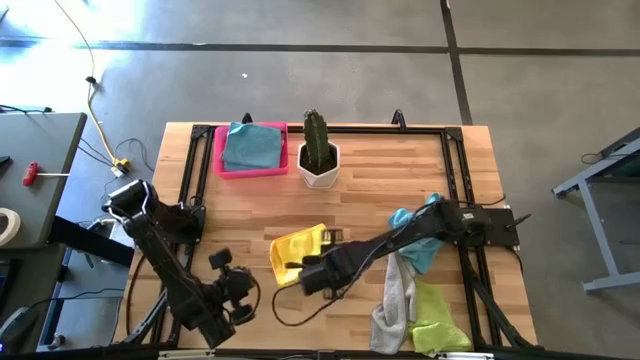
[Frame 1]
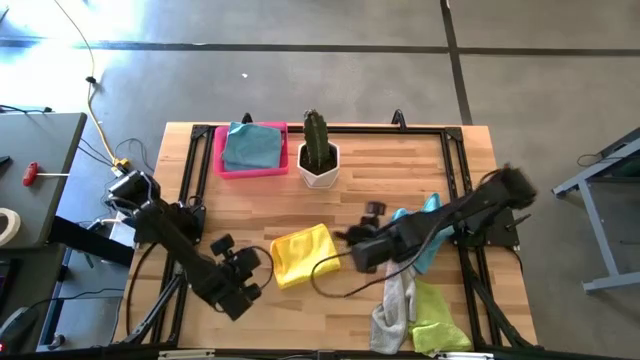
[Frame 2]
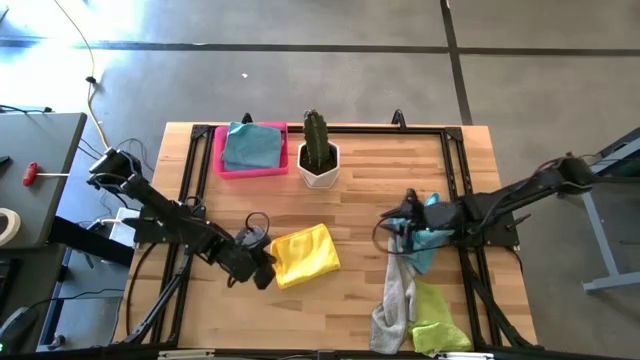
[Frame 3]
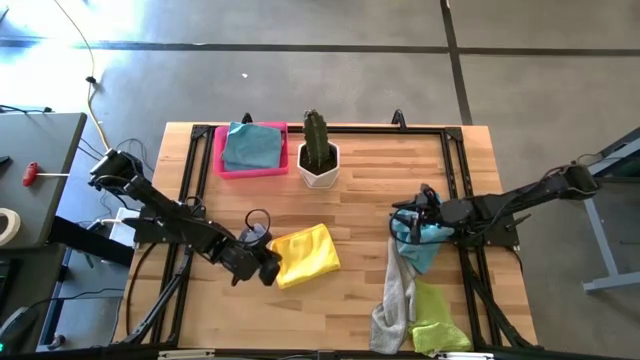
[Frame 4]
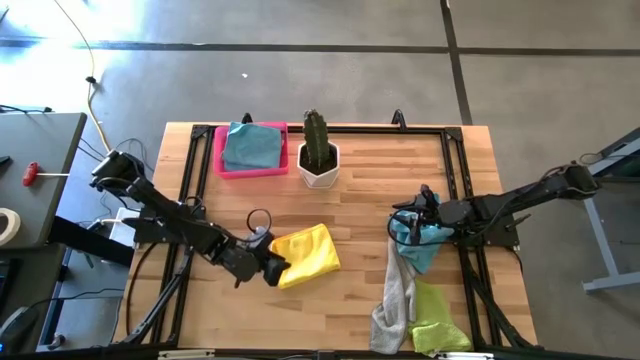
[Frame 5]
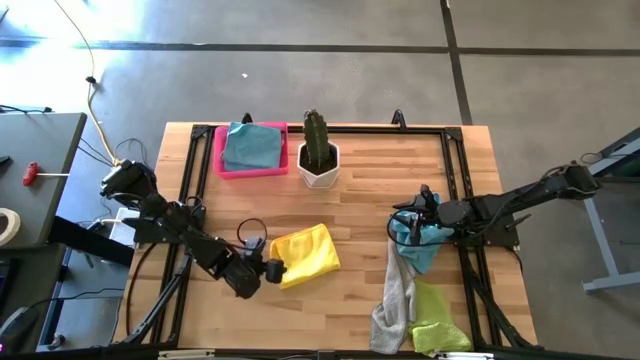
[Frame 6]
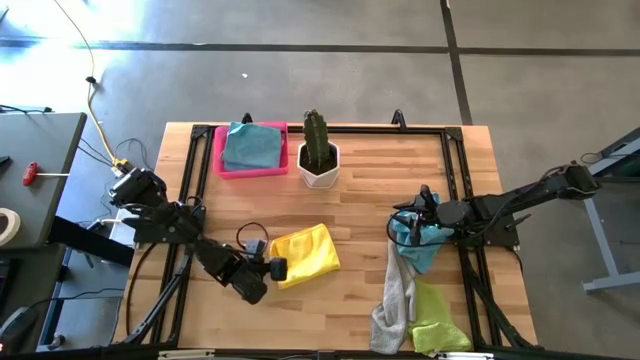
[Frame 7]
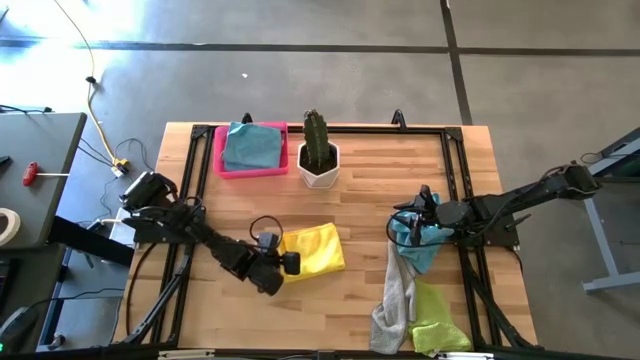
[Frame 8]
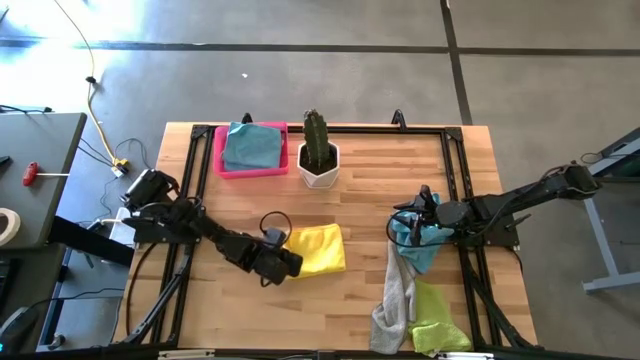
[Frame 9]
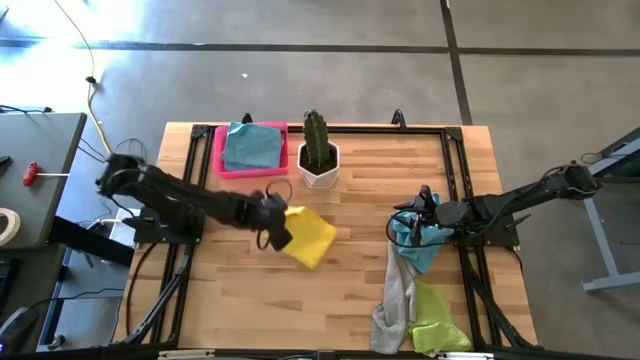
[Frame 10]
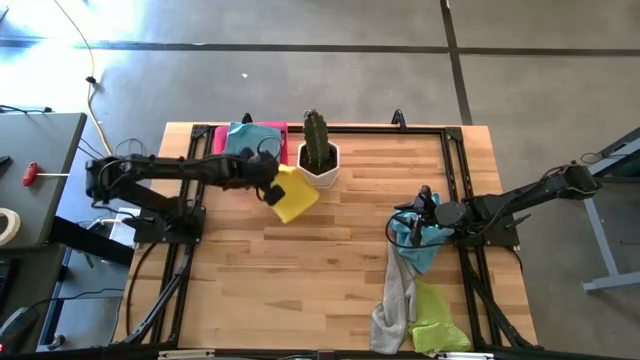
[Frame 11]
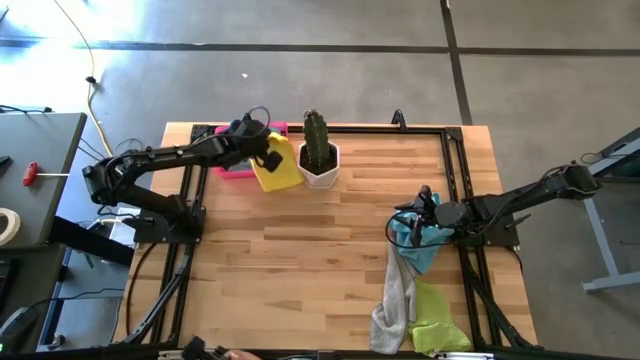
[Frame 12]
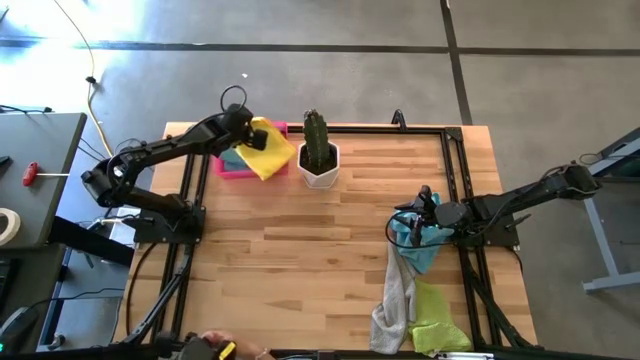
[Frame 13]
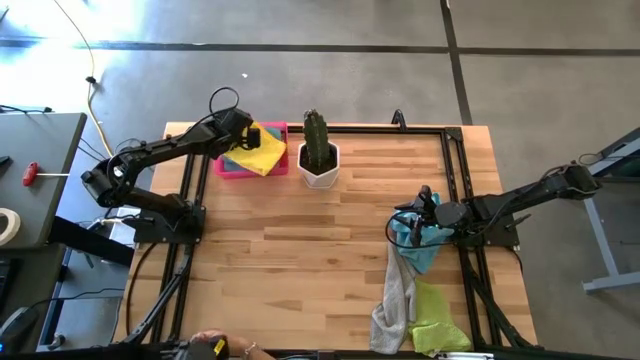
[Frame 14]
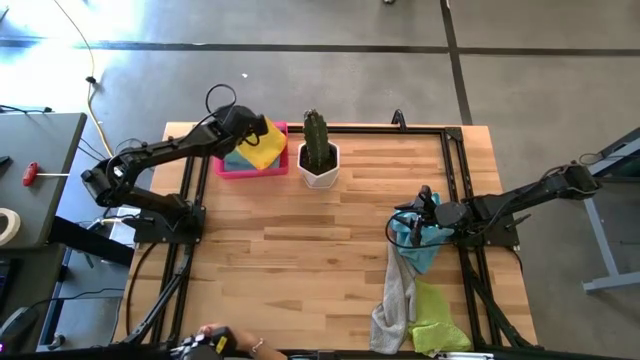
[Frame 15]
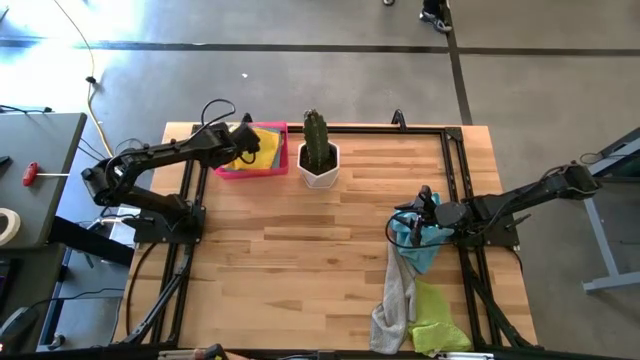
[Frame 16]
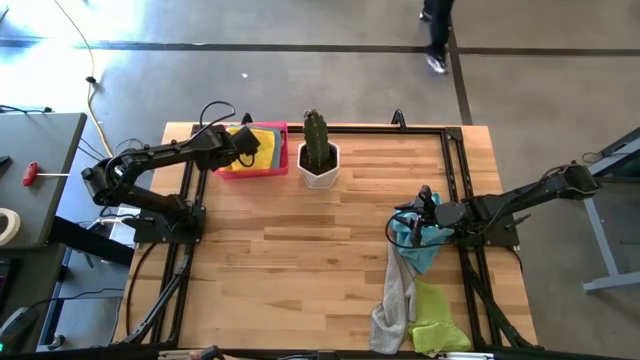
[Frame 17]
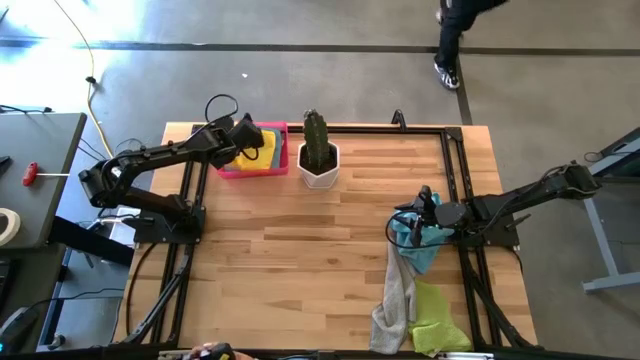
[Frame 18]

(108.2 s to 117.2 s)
Task: Fold microfiber towels
Put the folded yellow microfiber towel on the pink bin

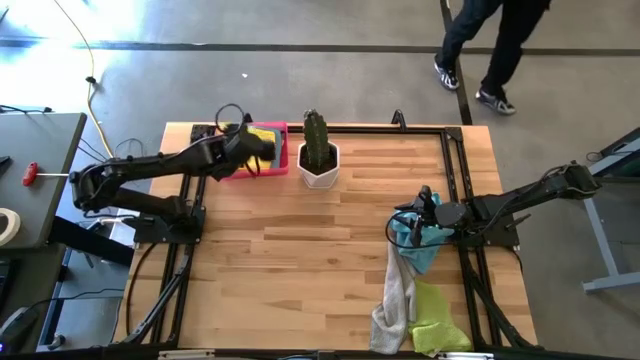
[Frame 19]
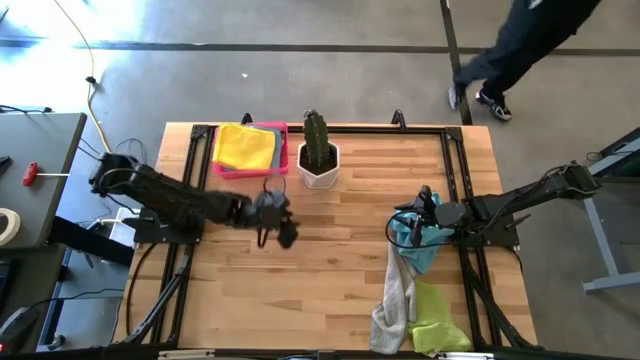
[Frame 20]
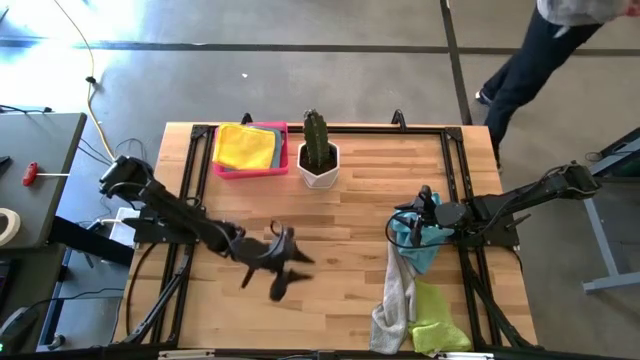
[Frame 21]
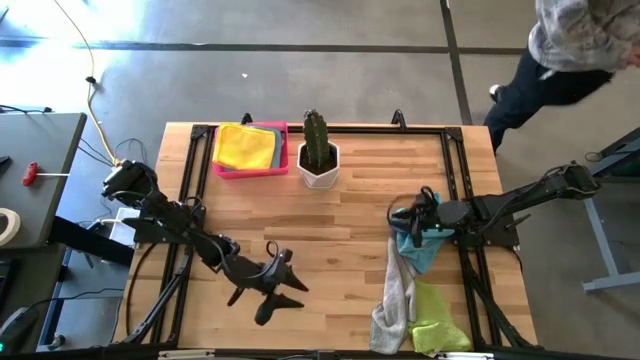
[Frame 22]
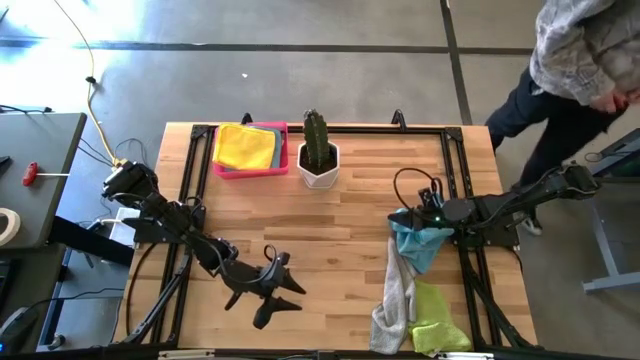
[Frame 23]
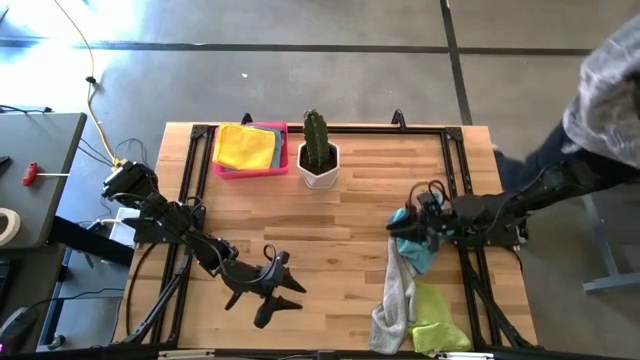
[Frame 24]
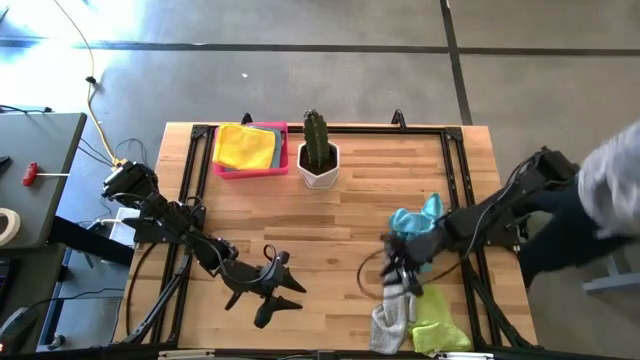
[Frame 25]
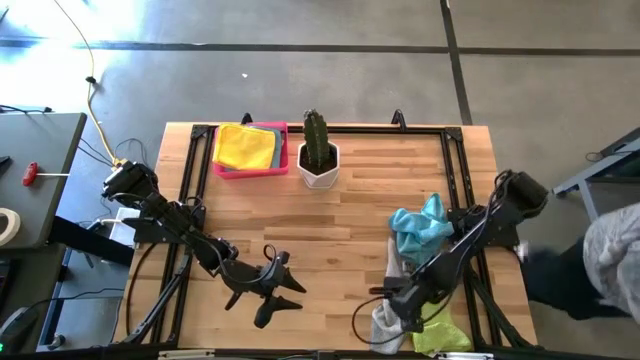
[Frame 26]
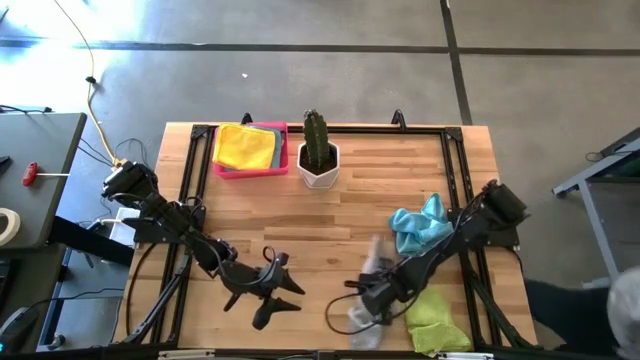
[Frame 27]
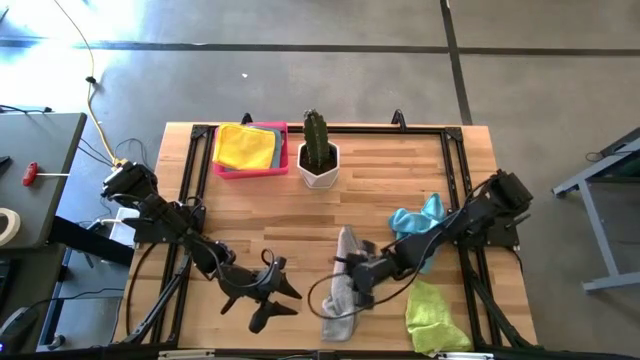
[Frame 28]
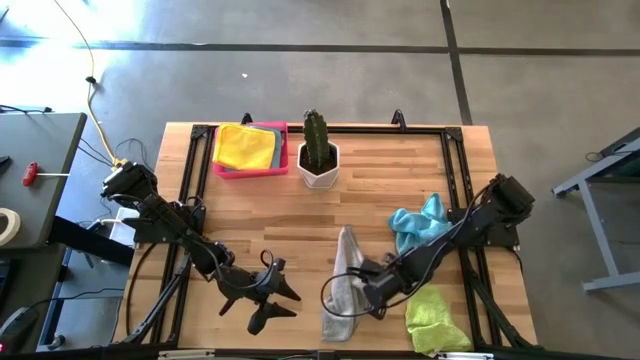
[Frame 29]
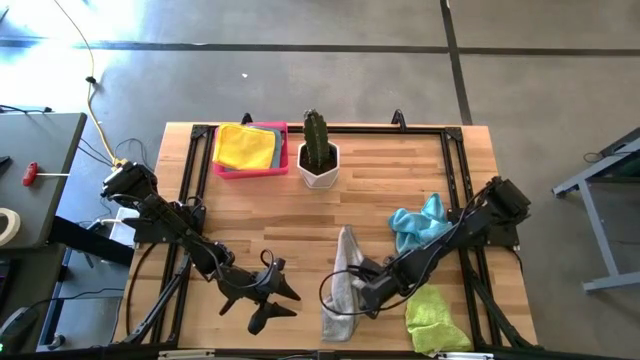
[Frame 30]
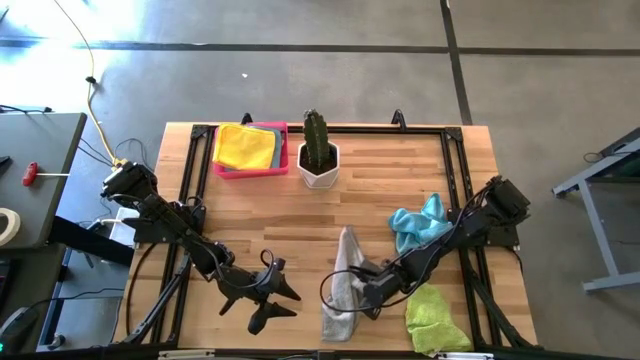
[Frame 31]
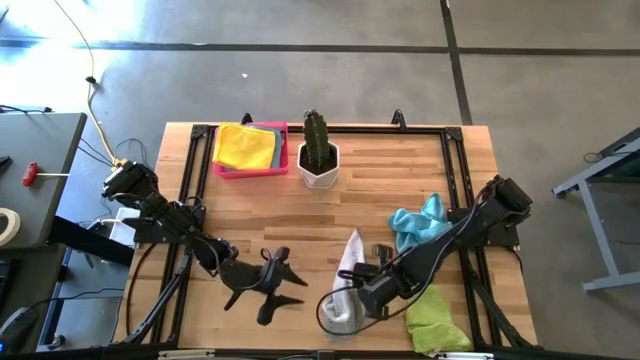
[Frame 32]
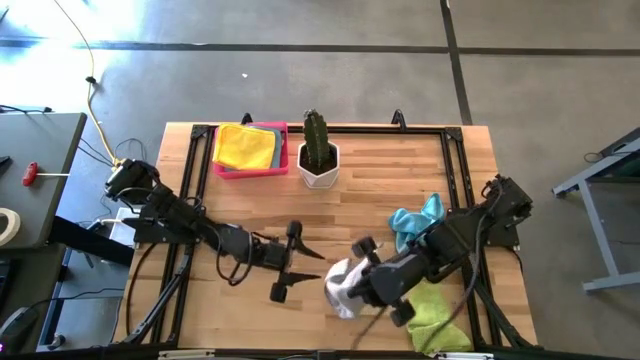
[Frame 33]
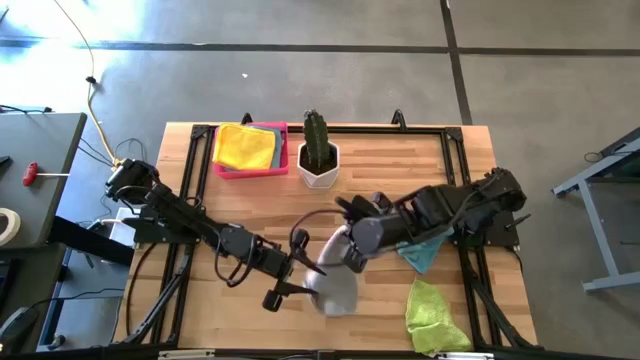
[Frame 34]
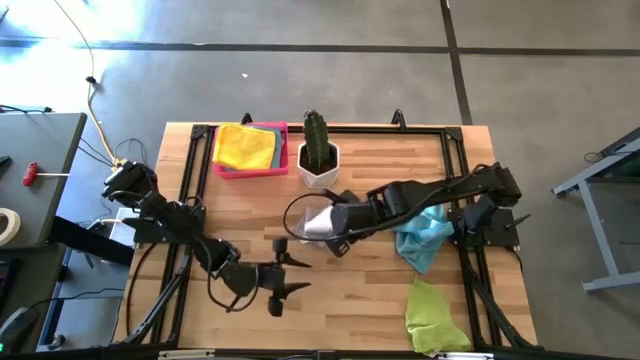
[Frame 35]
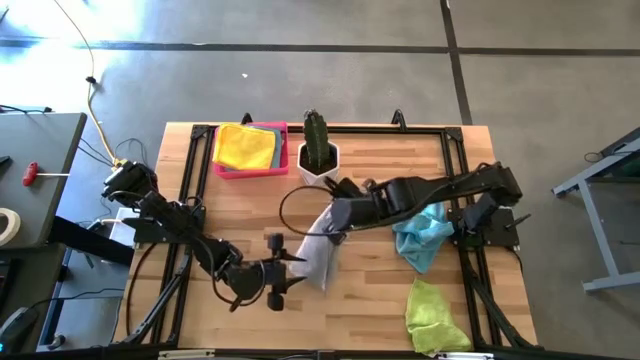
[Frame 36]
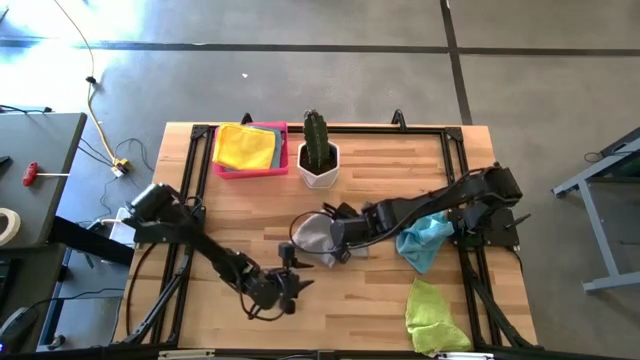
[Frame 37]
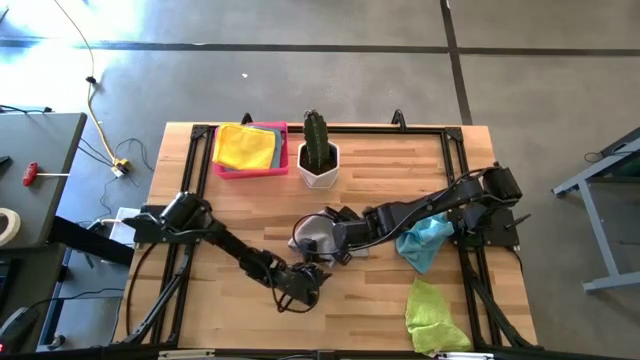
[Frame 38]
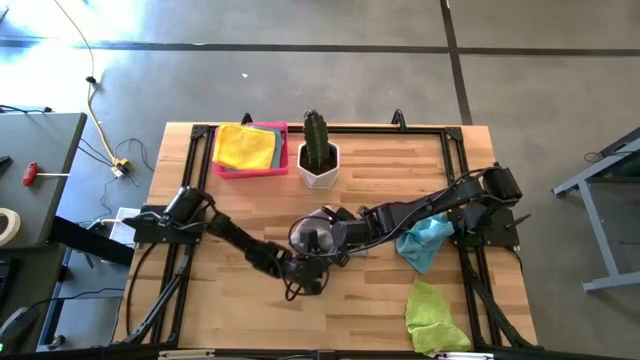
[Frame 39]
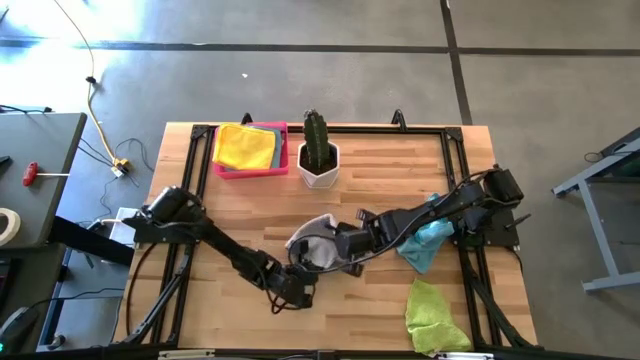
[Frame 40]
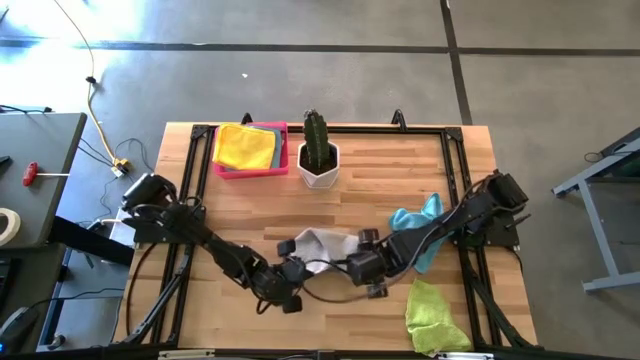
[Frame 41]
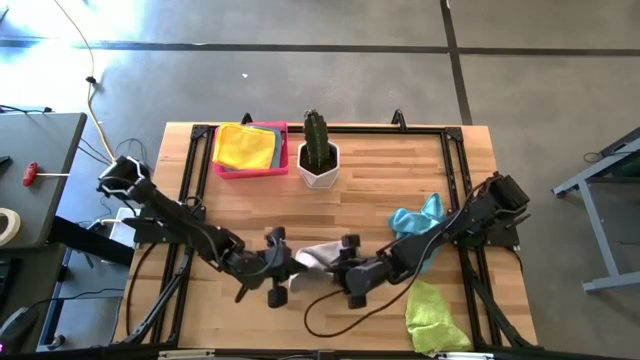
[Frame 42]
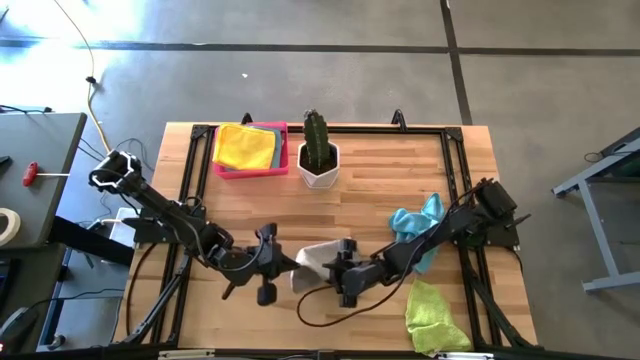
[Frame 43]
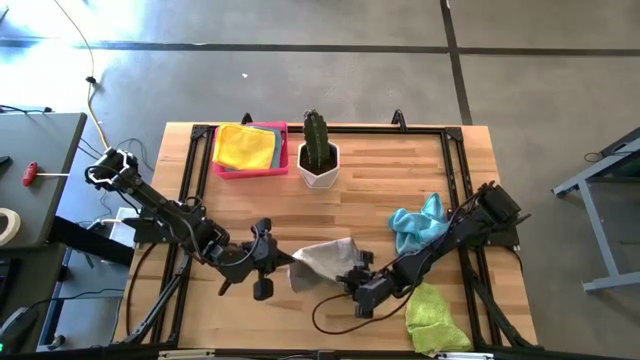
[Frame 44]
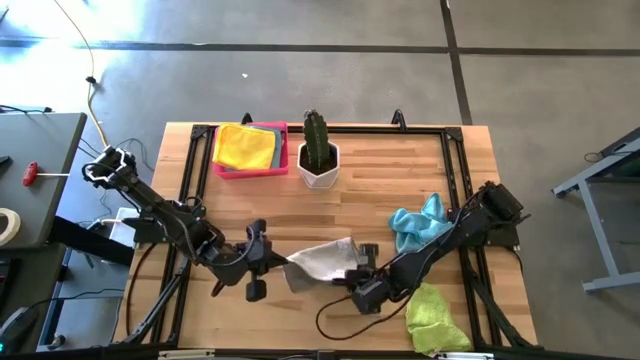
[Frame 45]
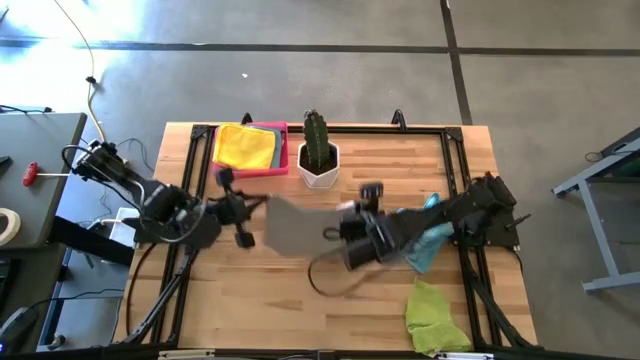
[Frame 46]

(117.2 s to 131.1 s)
Fold the gray microfiber towel
